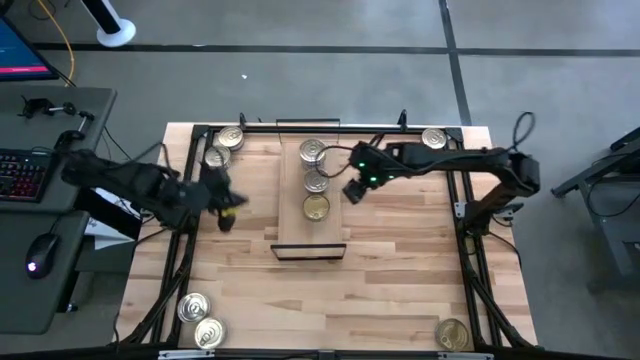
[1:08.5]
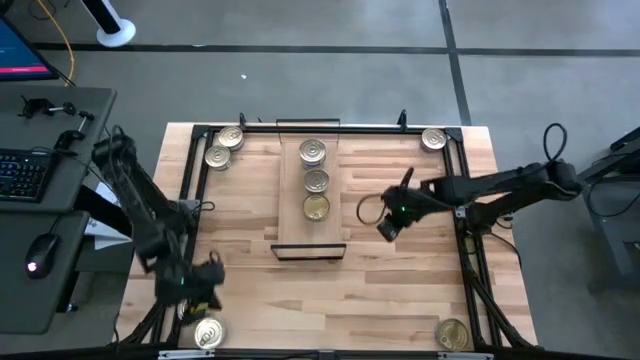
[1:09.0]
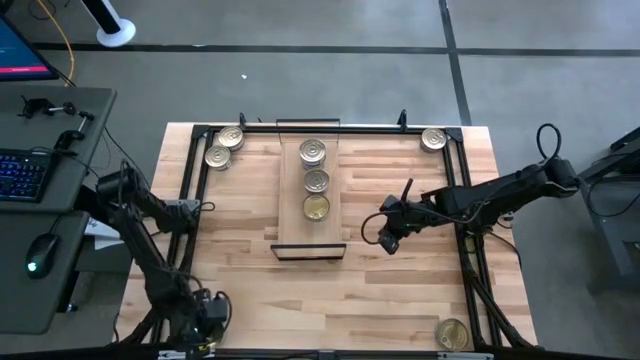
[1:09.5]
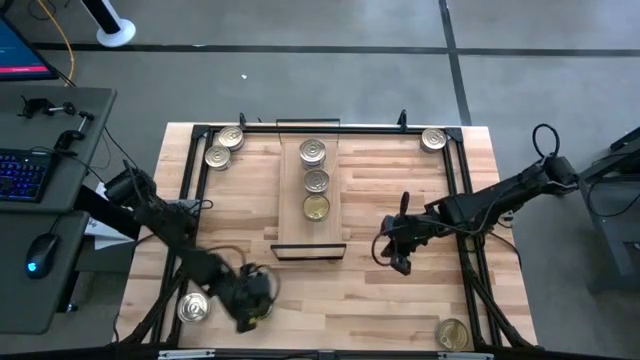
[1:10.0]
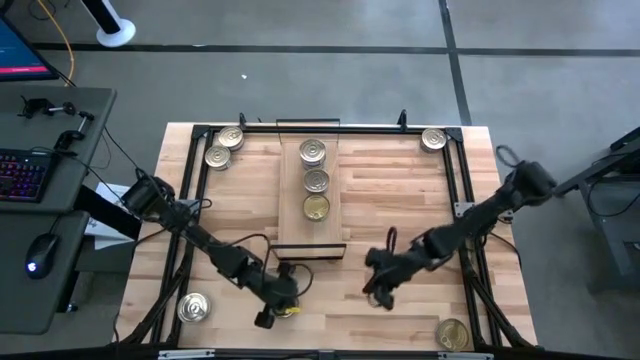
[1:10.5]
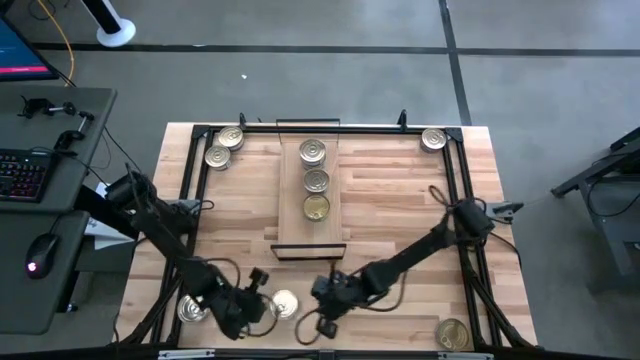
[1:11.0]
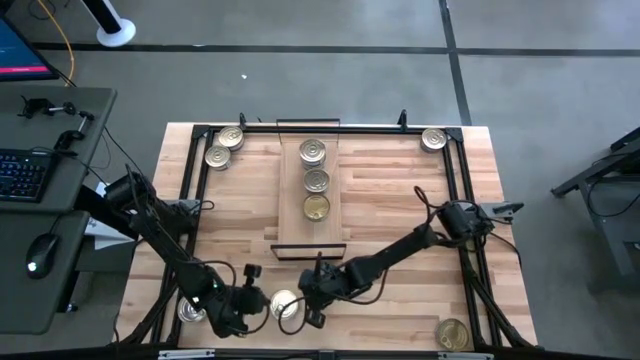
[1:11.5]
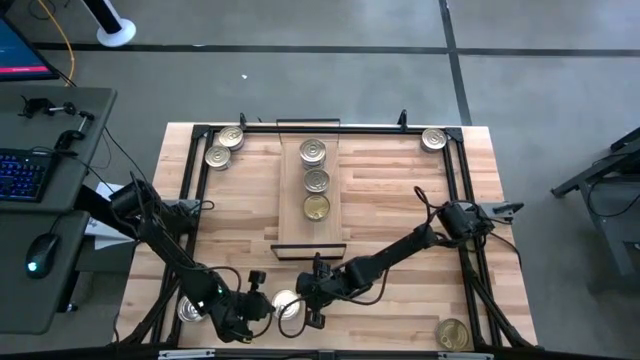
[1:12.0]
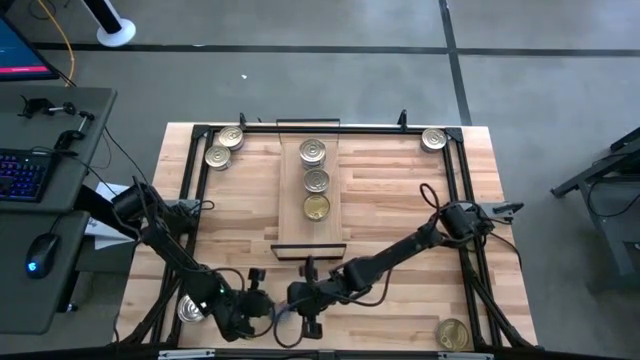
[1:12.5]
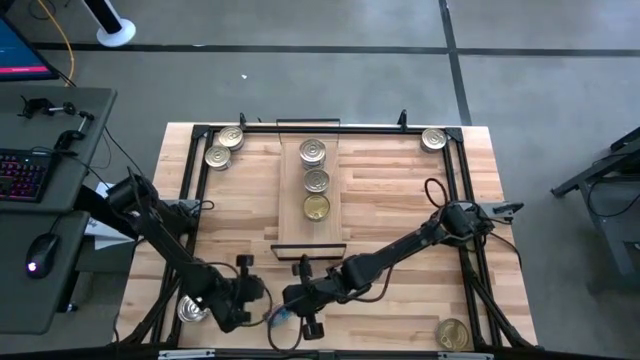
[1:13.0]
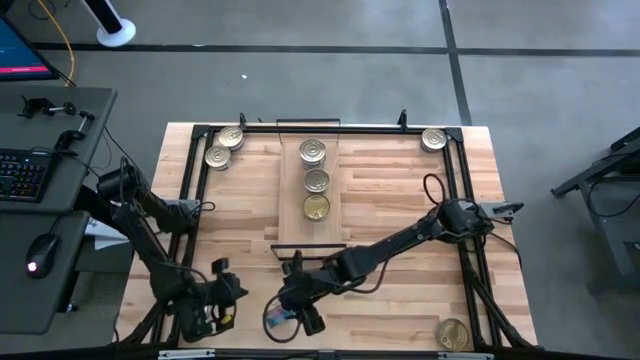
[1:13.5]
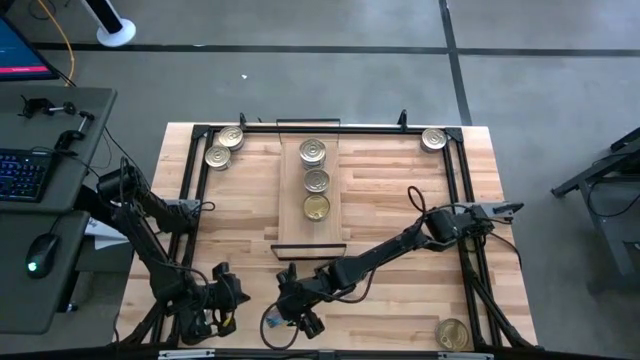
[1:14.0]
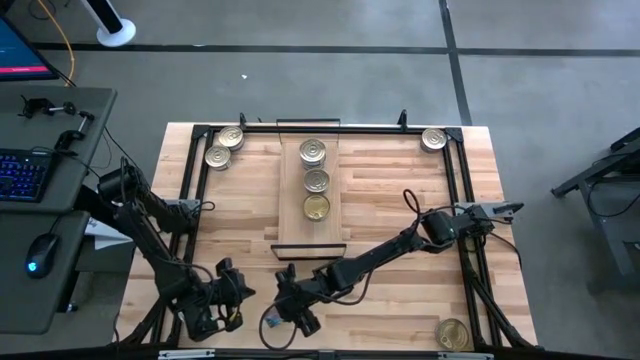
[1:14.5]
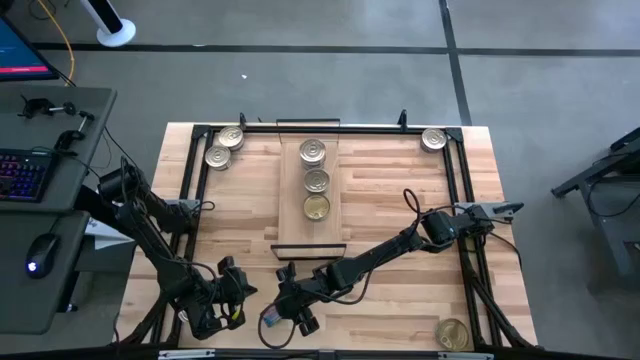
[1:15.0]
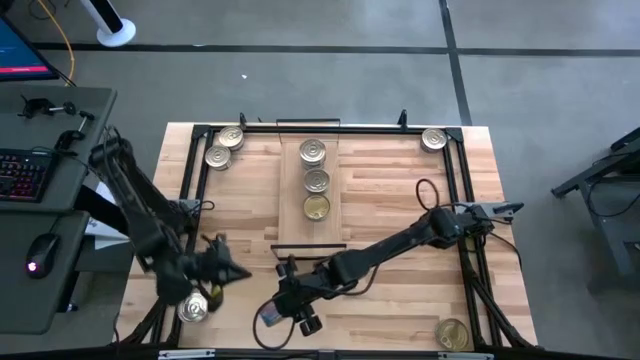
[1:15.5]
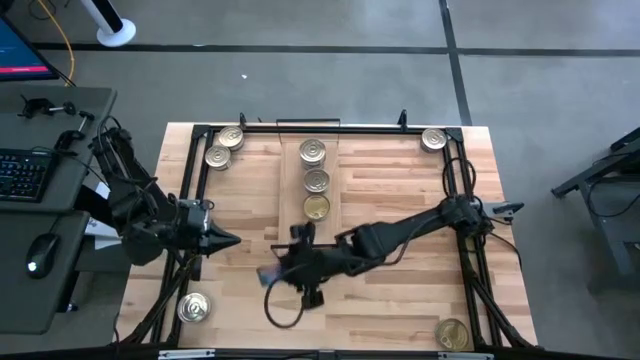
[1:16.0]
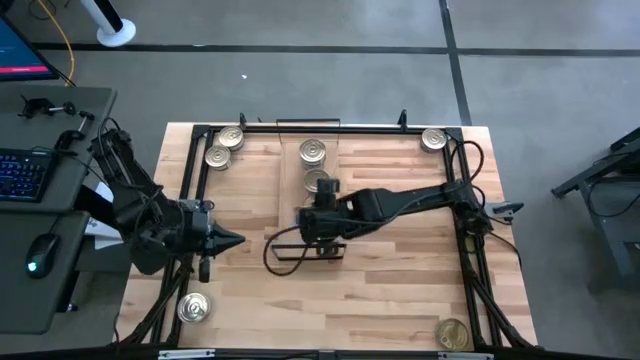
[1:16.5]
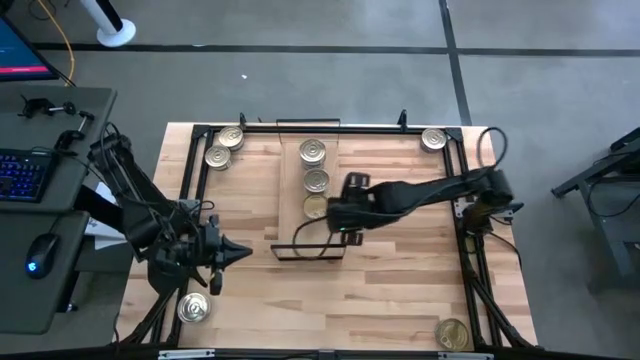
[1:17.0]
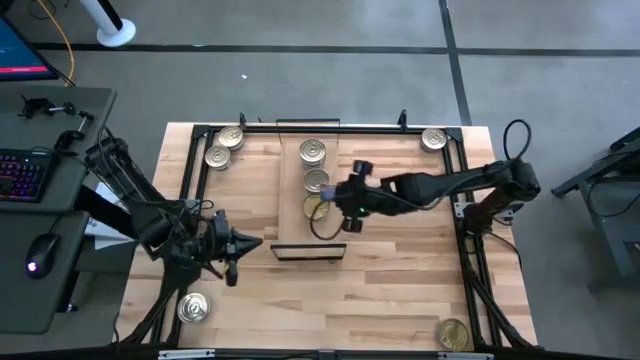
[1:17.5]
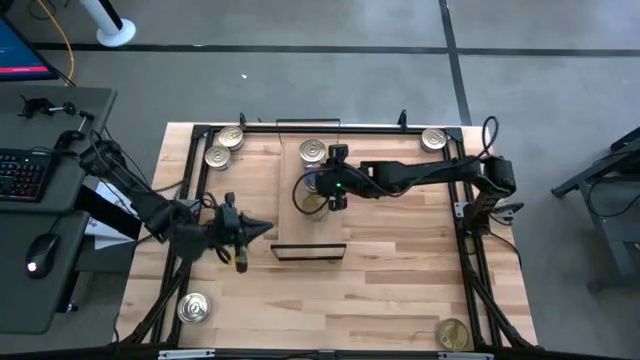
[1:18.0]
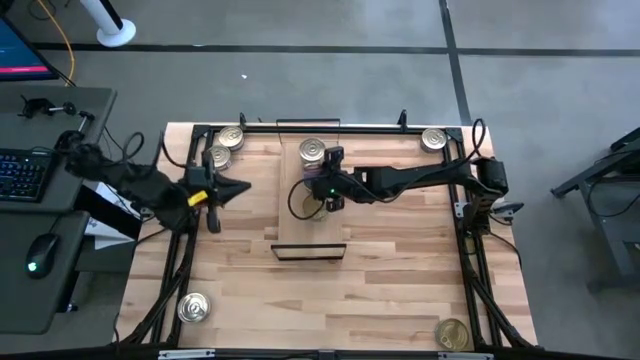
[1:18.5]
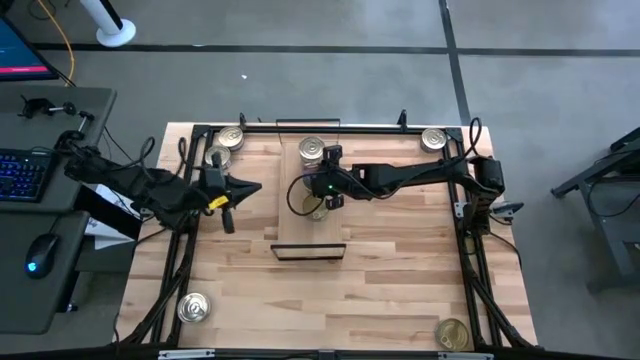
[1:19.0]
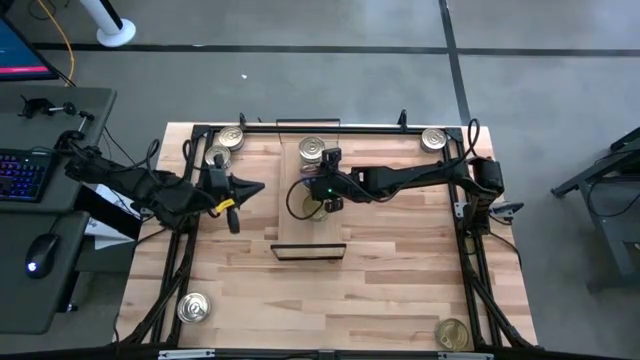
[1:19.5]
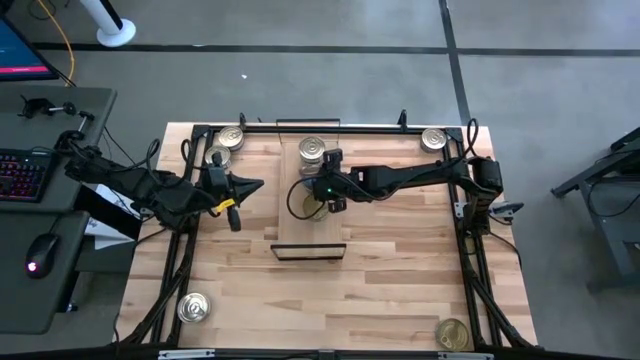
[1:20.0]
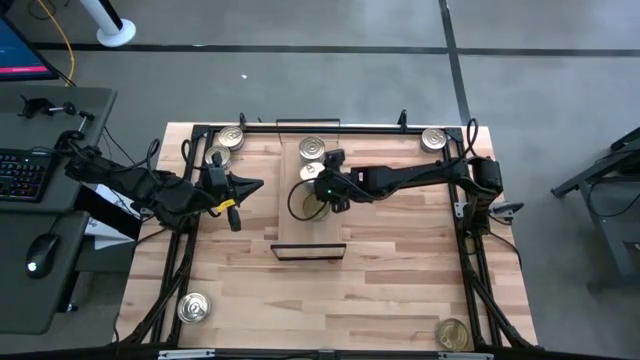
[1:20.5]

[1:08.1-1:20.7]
Task: Stack canned seafood by type on shelf
Stack the blue pink tuna can on top of the other blue pink tuna can on the shelf

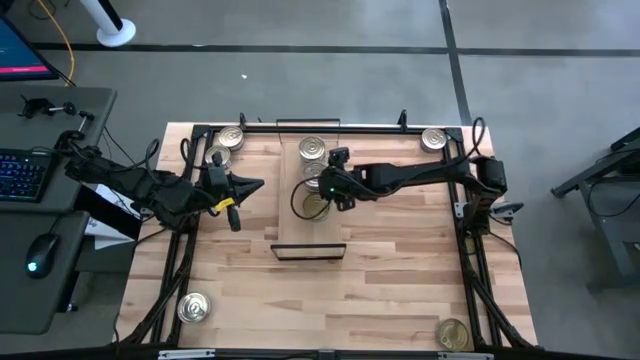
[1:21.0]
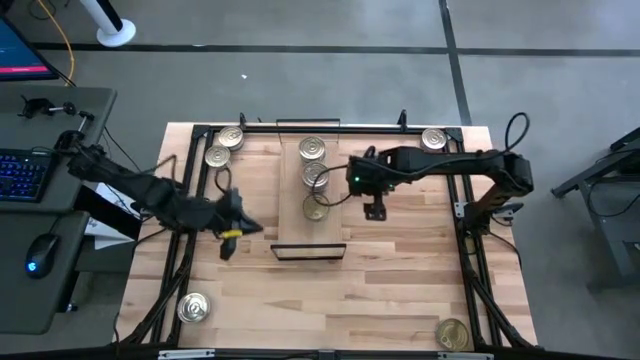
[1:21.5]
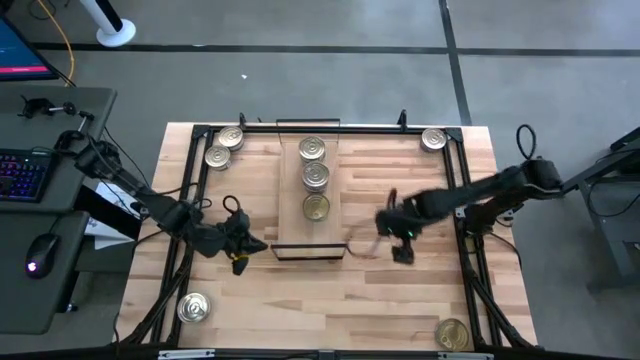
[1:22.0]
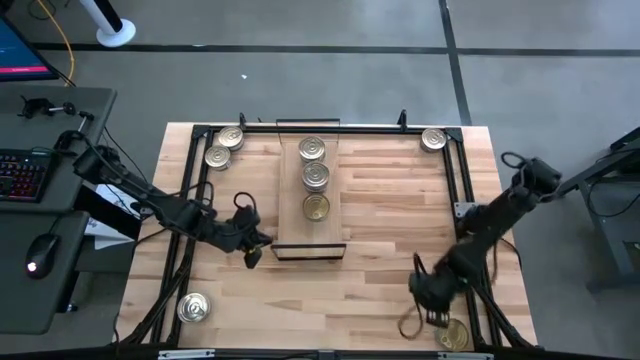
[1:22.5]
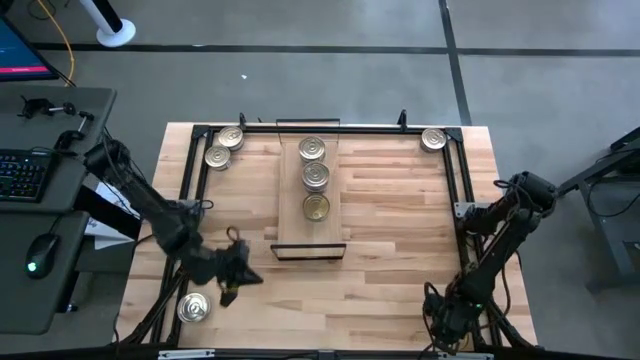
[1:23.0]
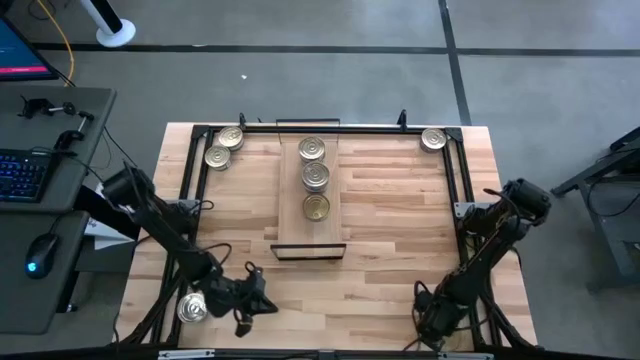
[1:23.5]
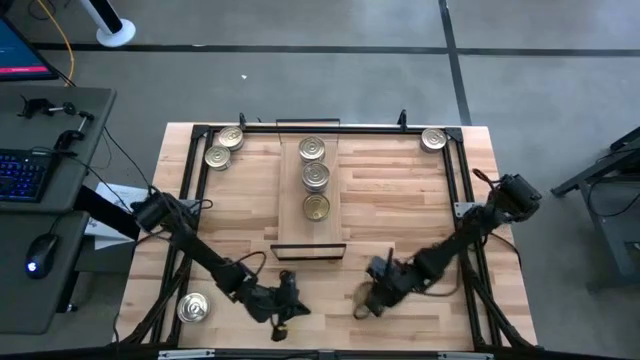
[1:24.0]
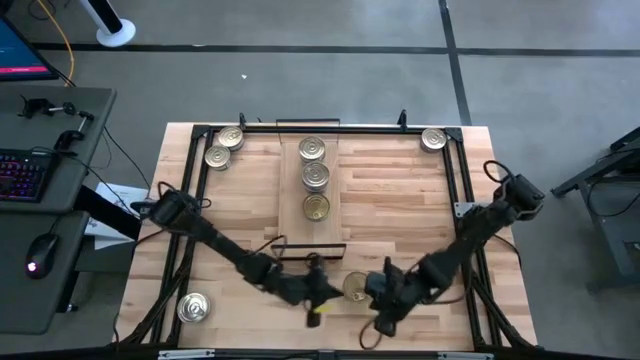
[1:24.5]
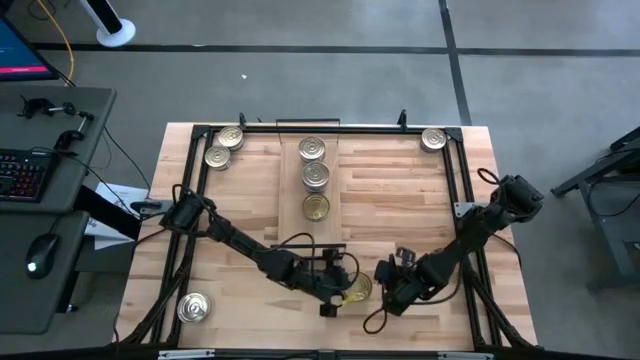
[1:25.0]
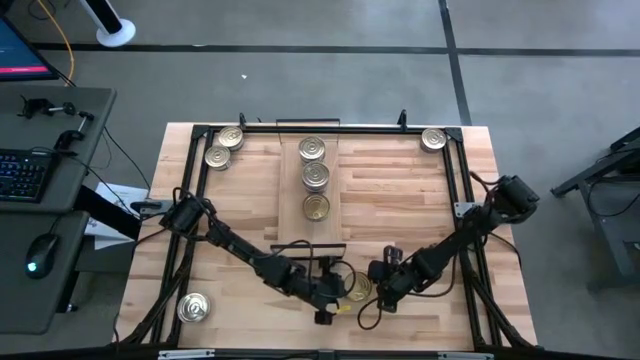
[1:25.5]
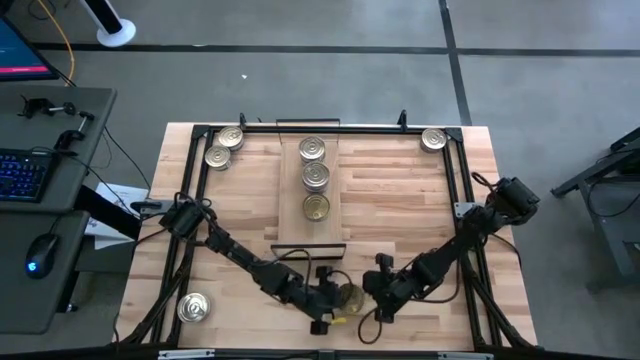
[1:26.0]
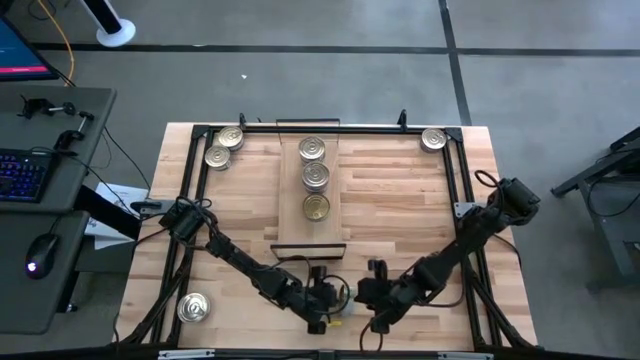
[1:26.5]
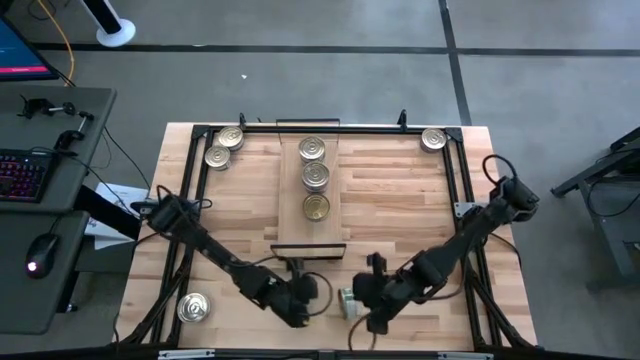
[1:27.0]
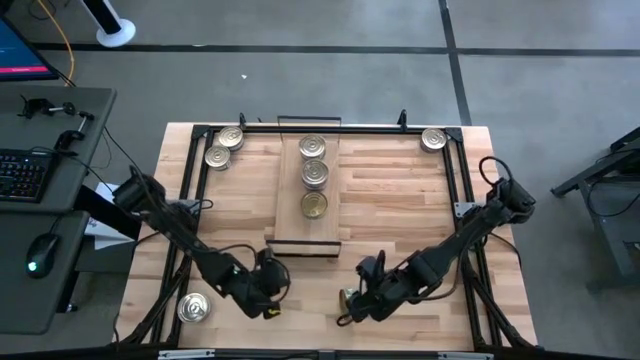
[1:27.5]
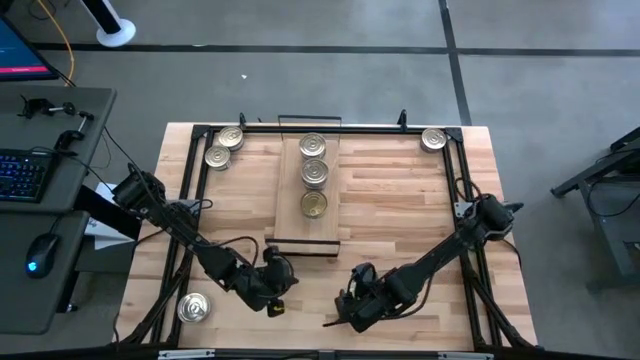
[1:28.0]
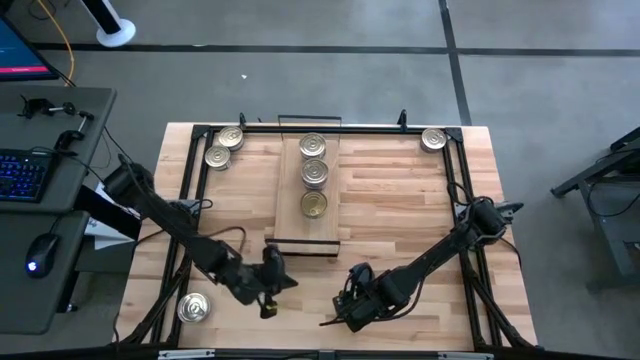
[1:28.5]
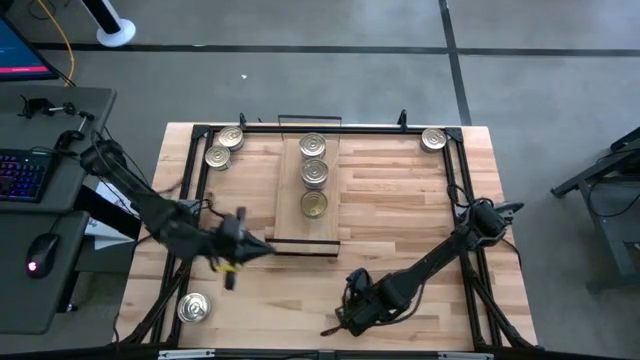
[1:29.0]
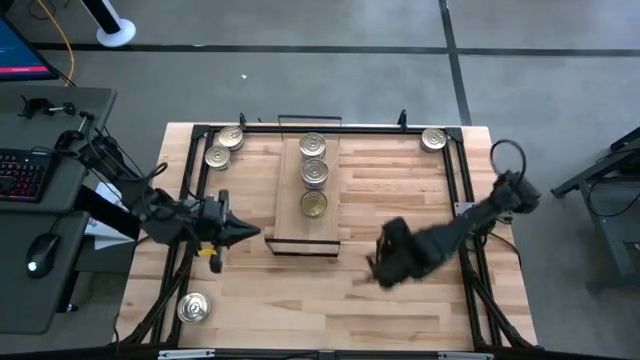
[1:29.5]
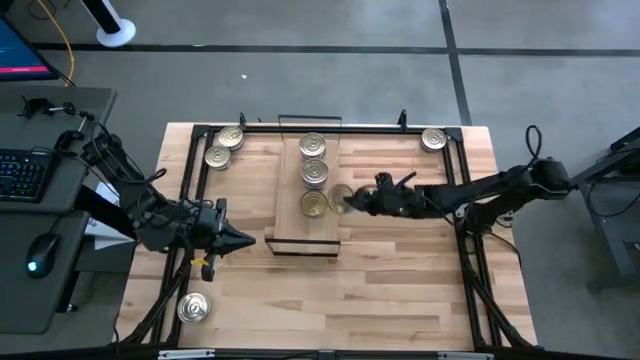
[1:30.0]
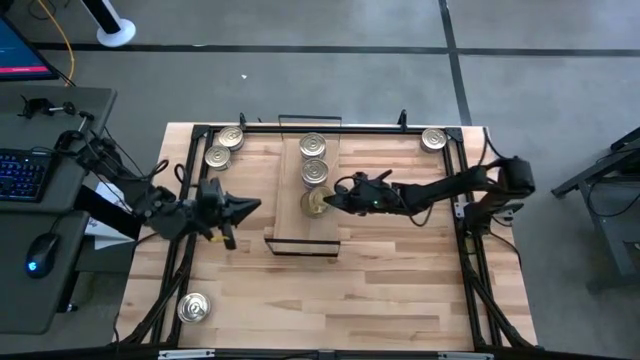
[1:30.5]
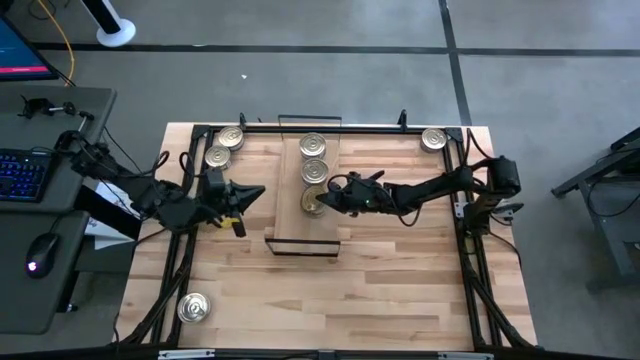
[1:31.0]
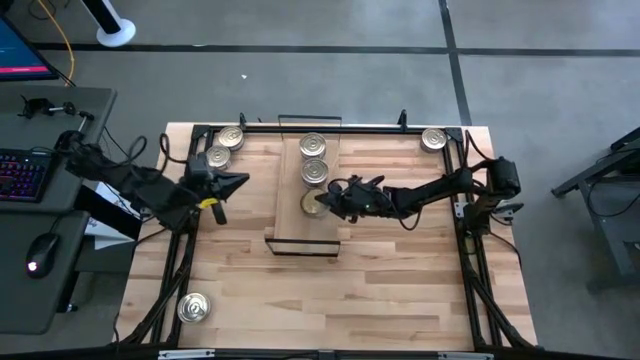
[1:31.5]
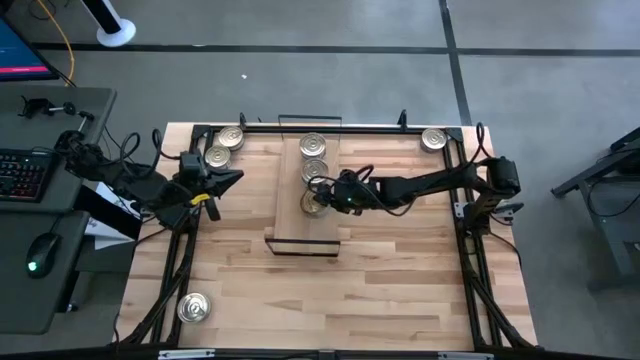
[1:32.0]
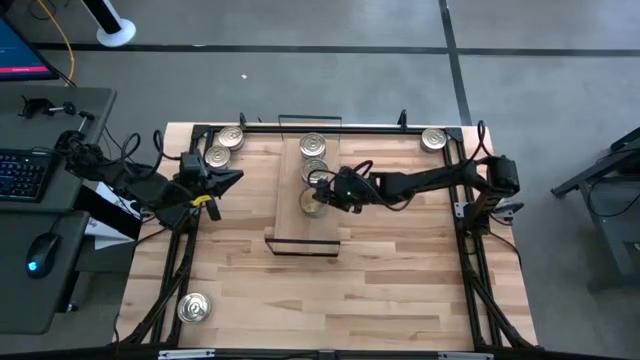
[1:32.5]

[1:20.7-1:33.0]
Stack the green tuna can on top of the other green tuna can on the shelf
